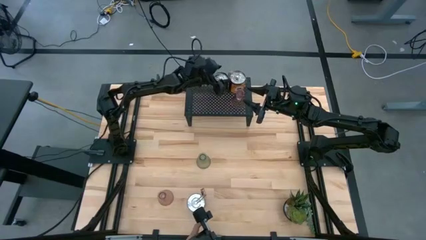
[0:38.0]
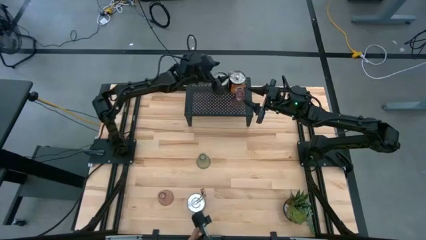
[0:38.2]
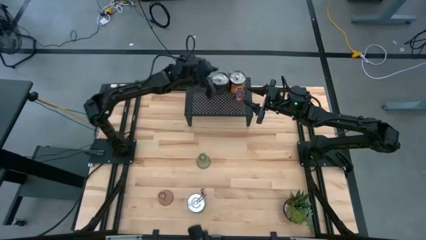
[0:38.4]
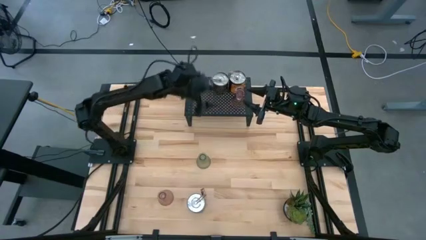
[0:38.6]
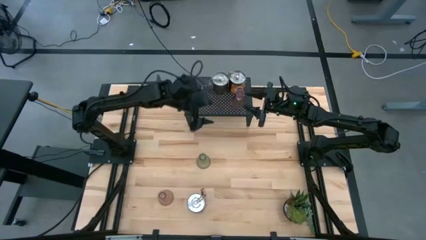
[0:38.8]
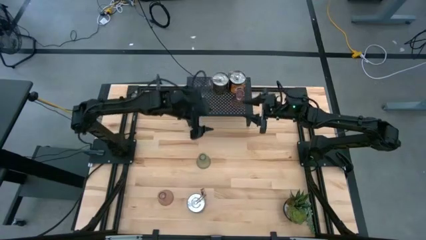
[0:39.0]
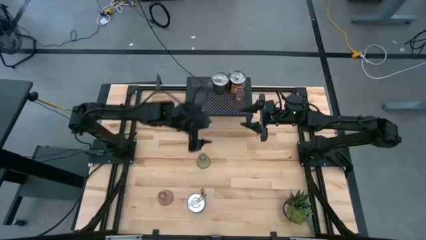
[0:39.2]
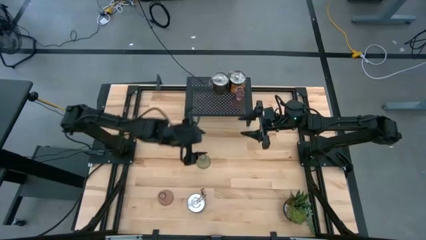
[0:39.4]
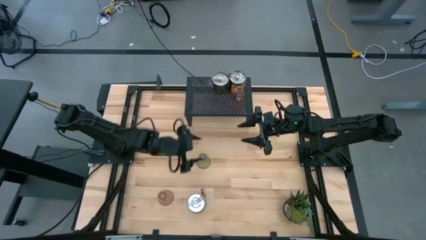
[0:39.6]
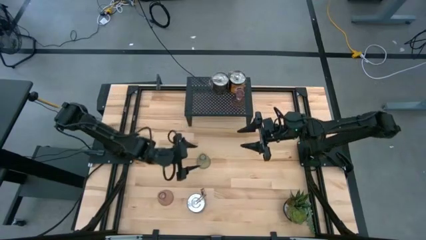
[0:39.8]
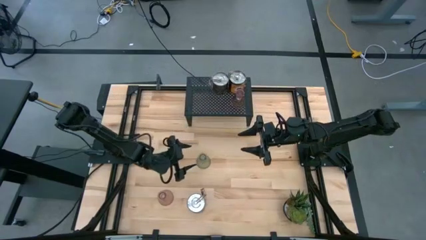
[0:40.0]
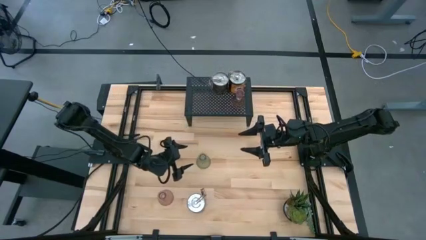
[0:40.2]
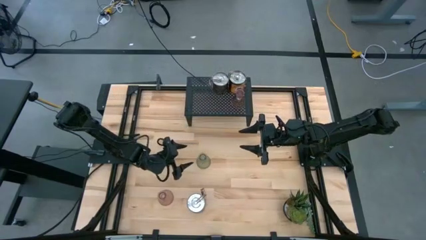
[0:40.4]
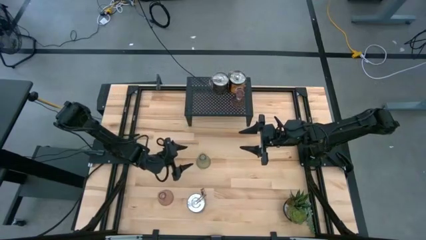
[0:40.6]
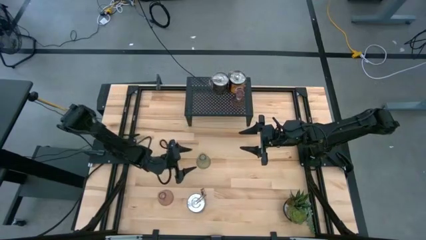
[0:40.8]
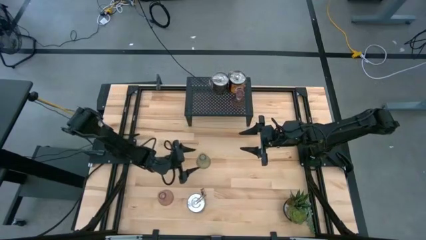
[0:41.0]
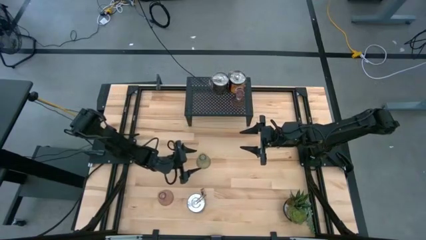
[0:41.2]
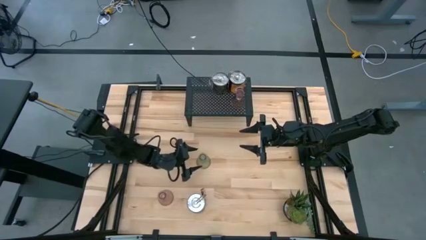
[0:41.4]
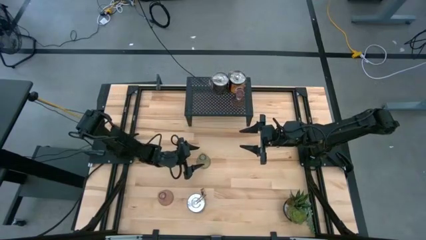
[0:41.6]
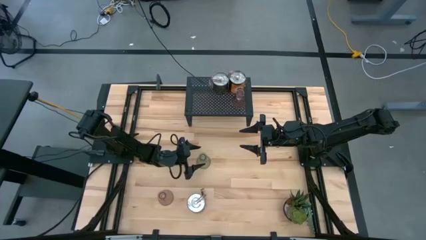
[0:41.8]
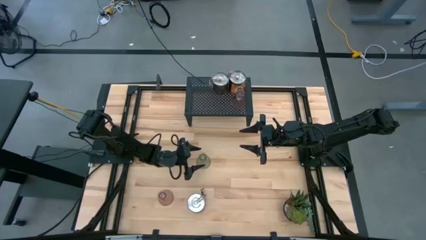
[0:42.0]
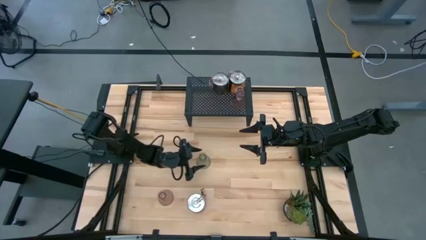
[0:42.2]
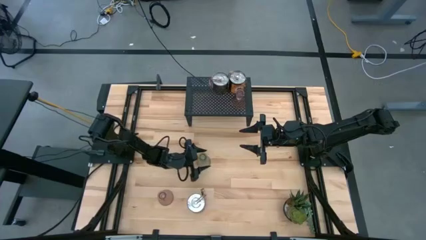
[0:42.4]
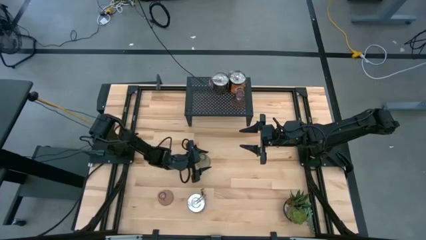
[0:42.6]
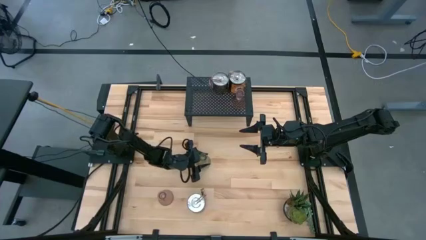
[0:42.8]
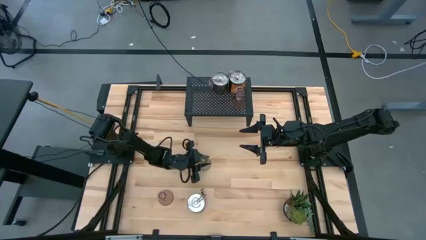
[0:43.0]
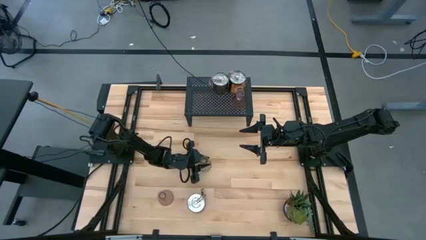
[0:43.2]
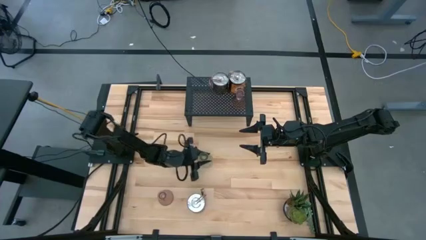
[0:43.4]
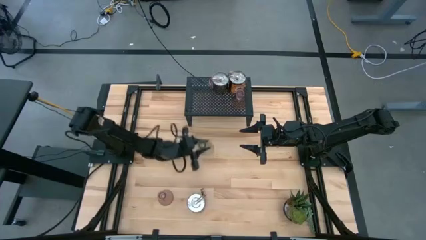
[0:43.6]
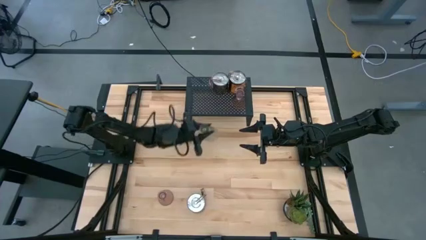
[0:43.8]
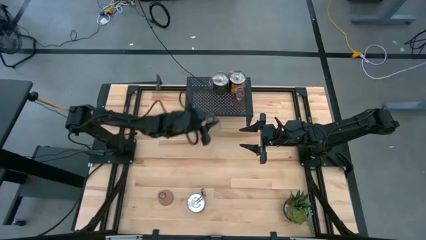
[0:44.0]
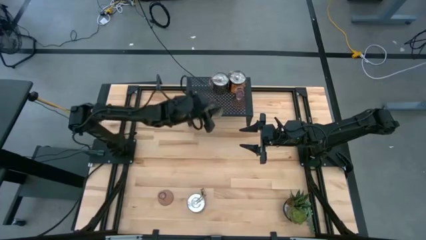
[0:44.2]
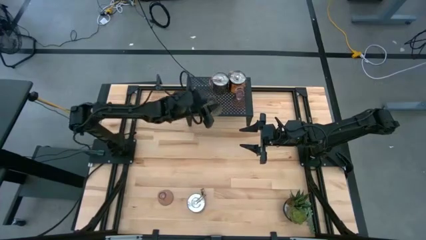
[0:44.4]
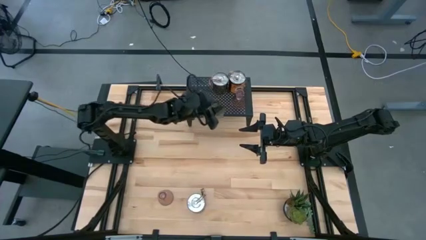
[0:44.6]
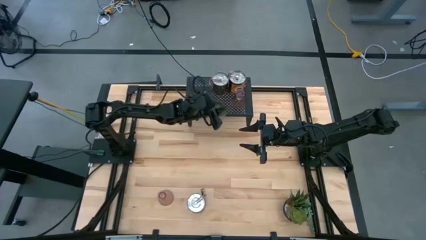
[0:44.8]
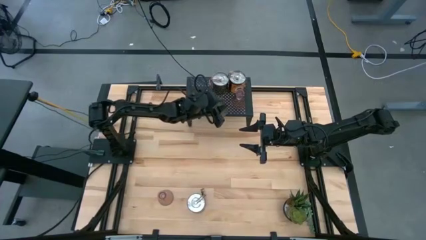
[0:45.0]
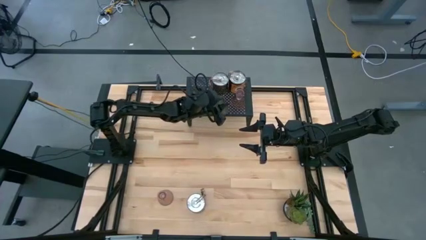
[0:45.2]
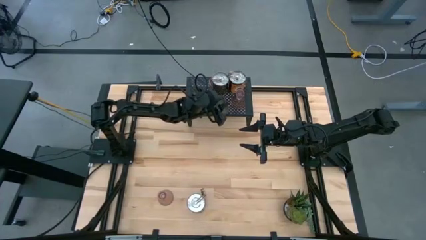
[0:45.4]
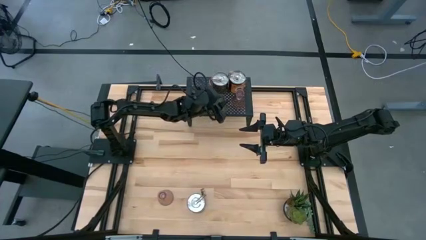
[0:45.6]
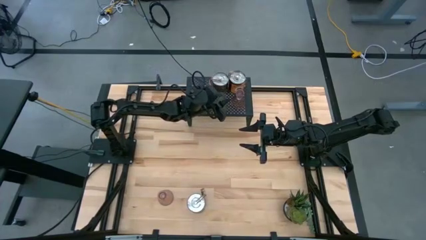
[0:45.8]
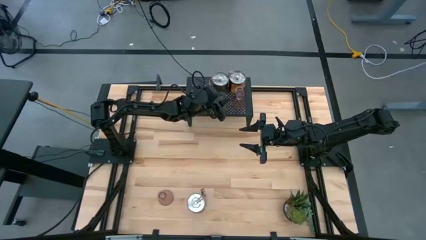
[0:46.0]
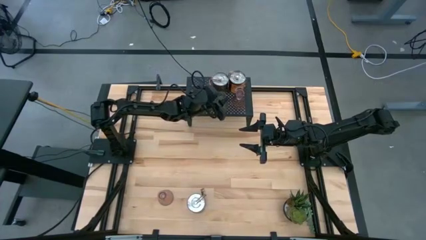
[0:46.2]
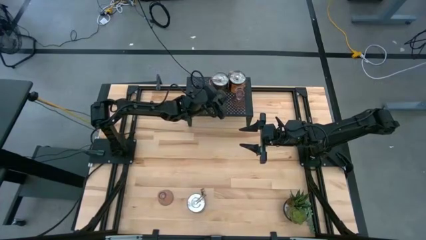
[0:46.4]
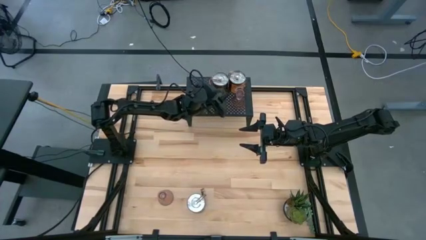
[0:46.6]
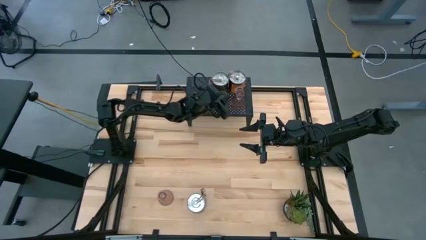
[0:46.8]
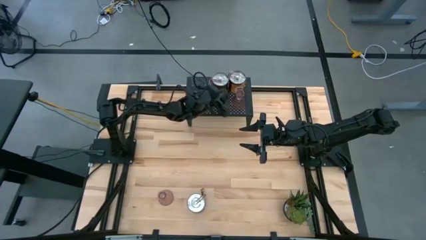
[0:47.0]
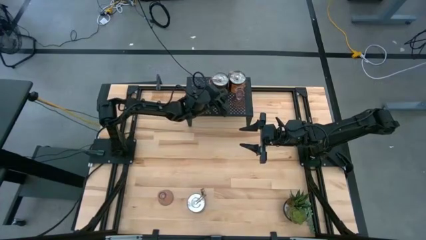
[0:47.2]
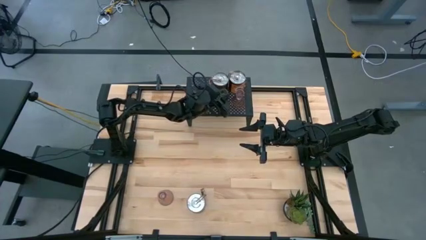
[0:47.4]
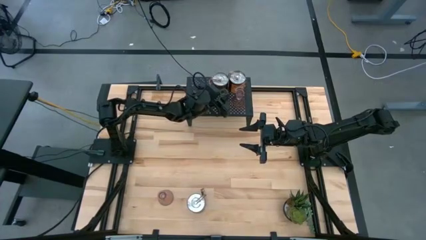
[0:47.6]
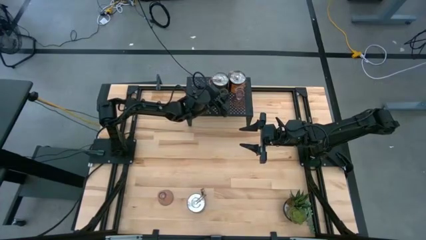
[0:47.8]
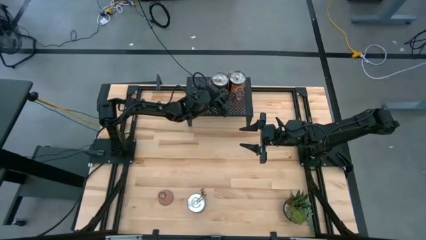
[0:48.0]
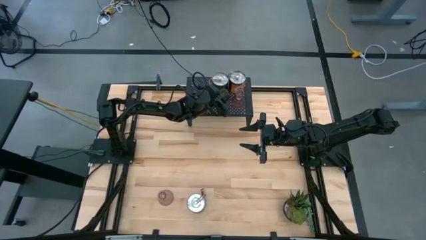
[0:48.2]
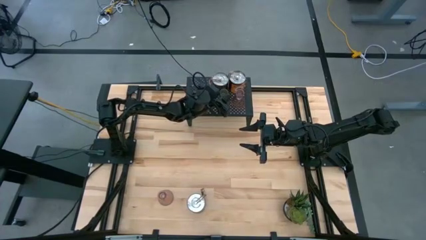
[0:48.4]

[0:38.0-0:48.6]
Task: Pick & Place candle stick holders
Put the green candle holder on the shelf aligned with the other candle holders
